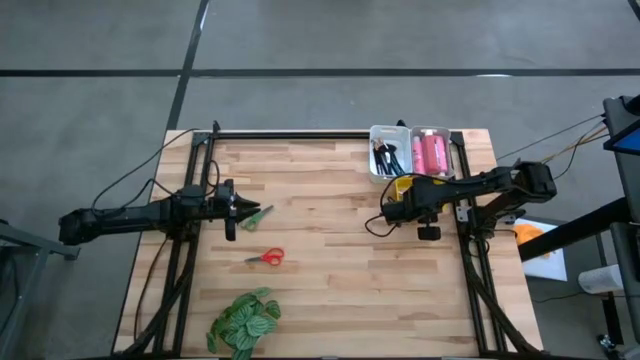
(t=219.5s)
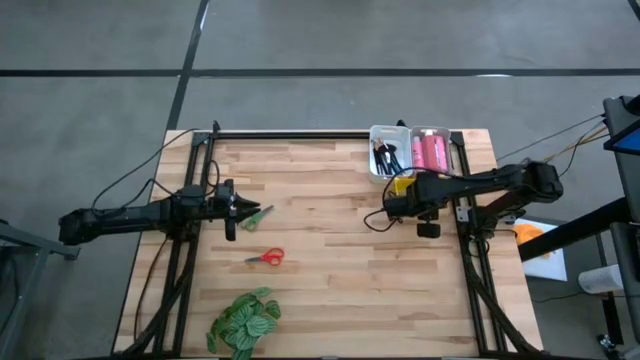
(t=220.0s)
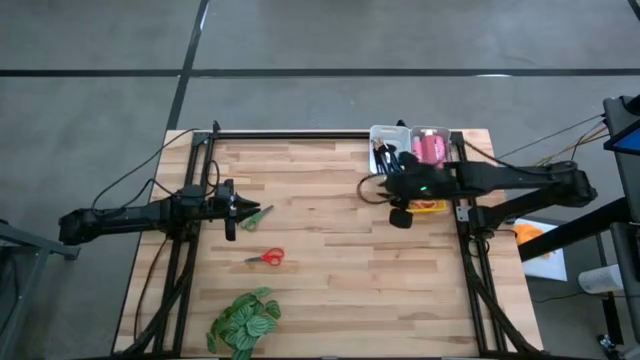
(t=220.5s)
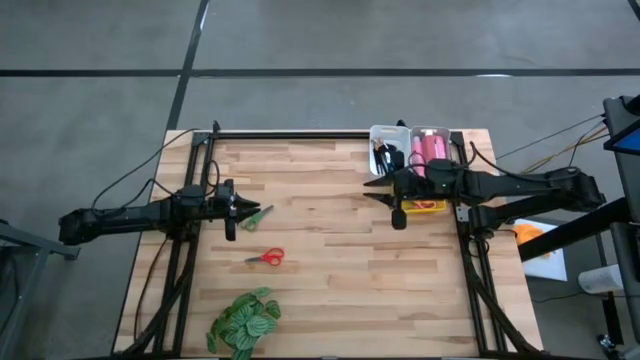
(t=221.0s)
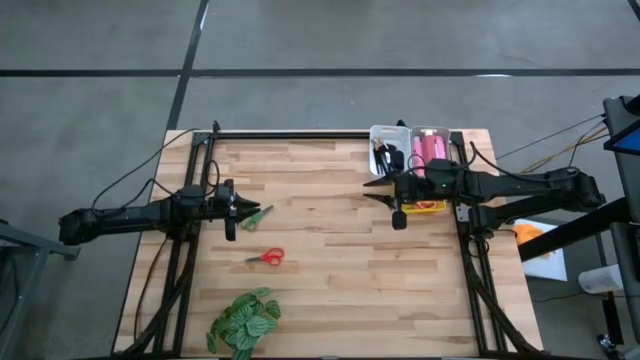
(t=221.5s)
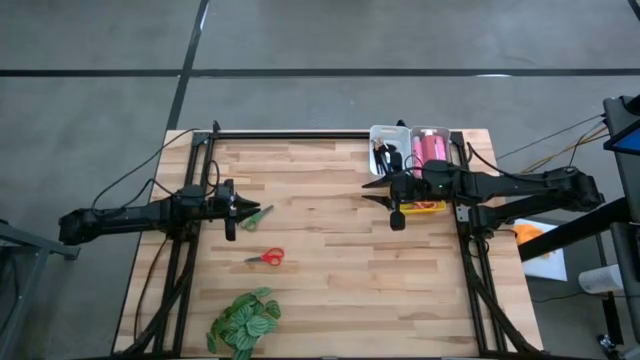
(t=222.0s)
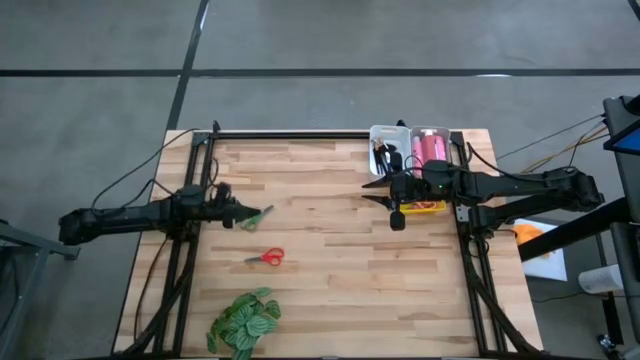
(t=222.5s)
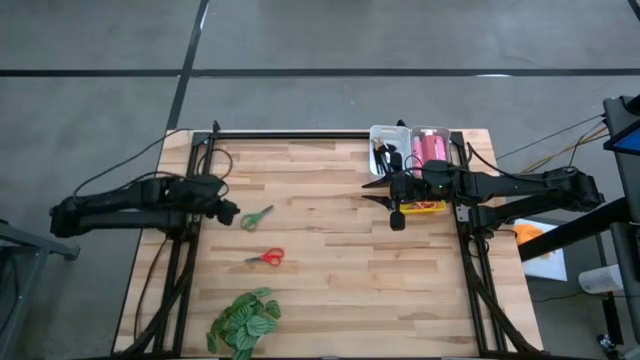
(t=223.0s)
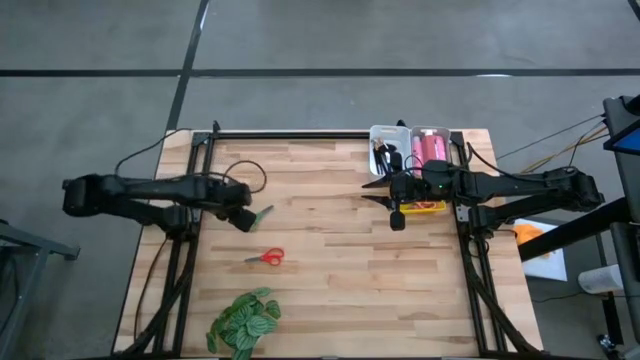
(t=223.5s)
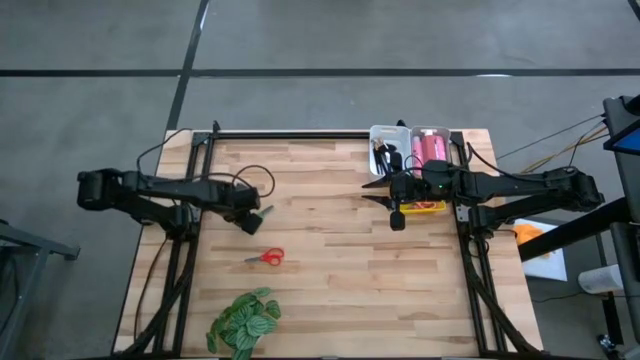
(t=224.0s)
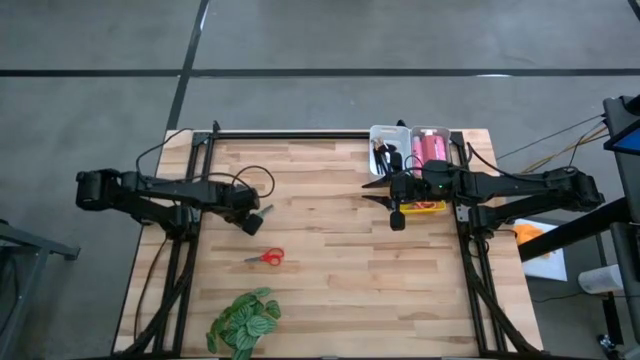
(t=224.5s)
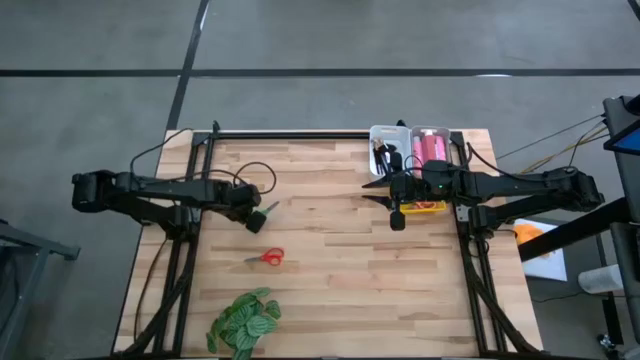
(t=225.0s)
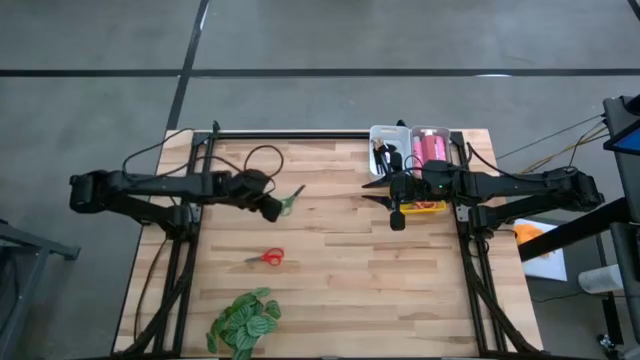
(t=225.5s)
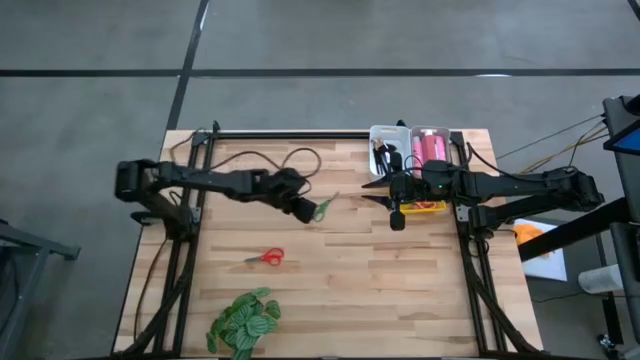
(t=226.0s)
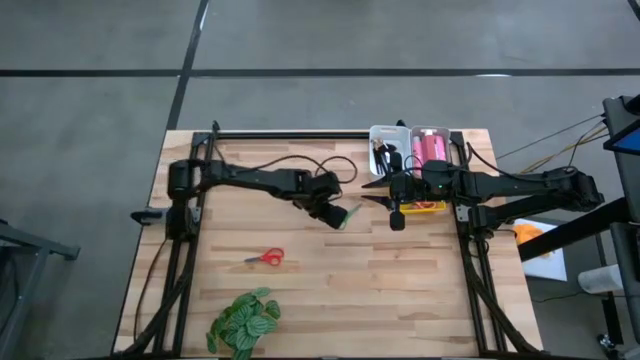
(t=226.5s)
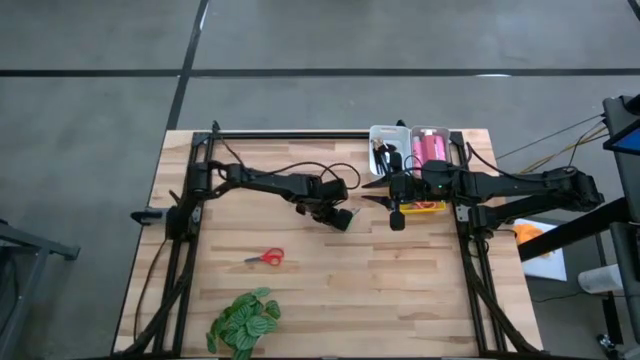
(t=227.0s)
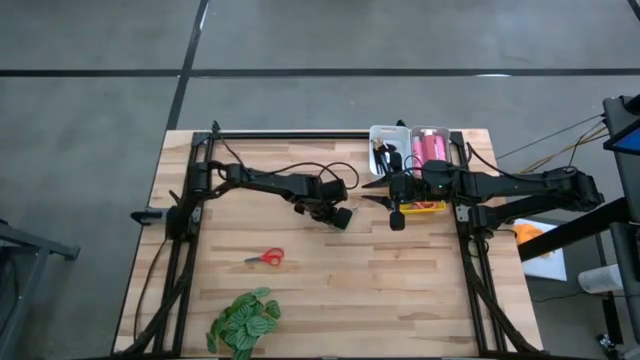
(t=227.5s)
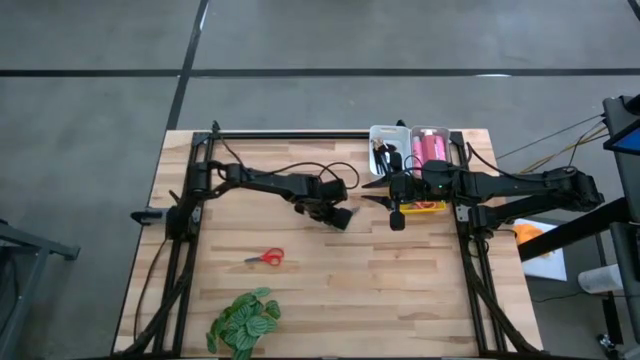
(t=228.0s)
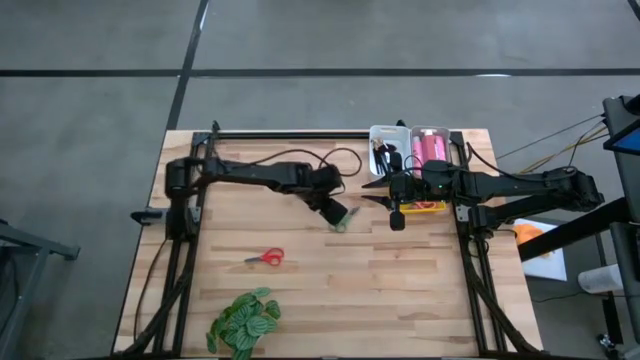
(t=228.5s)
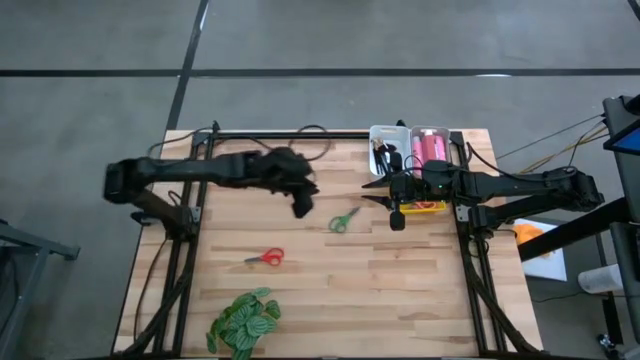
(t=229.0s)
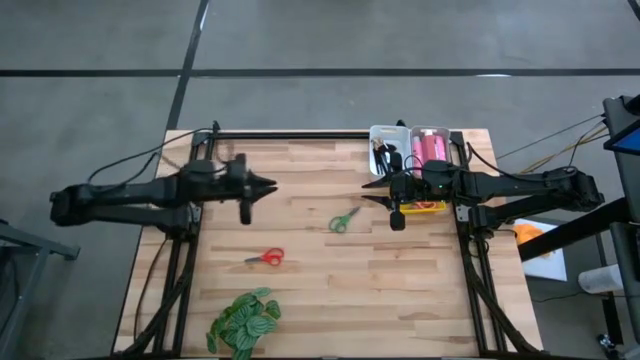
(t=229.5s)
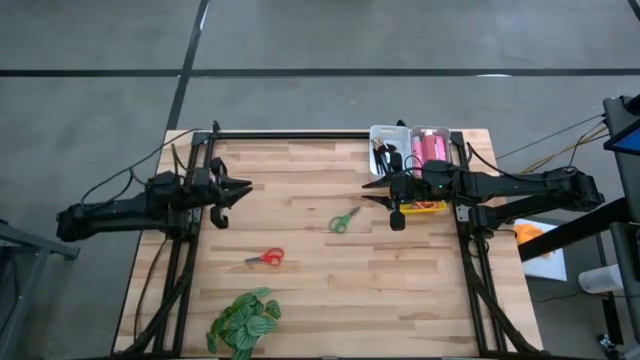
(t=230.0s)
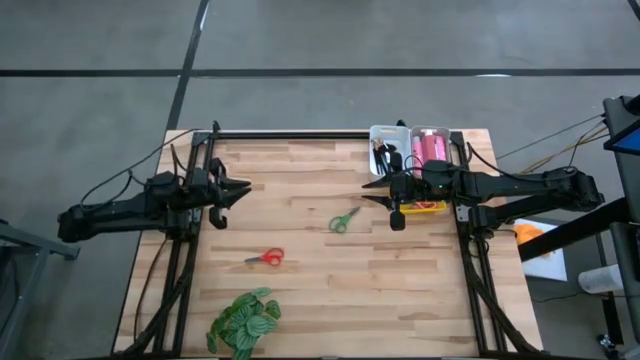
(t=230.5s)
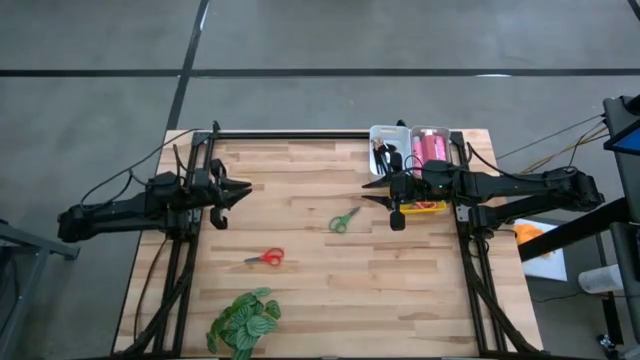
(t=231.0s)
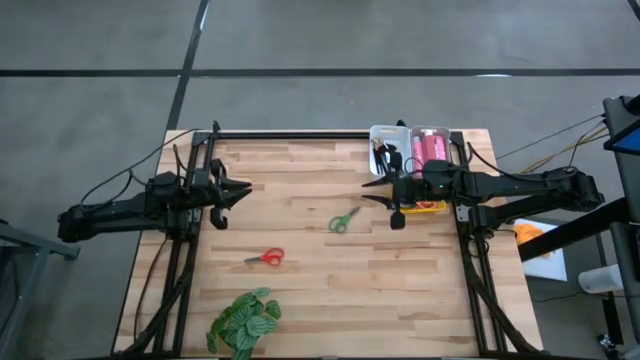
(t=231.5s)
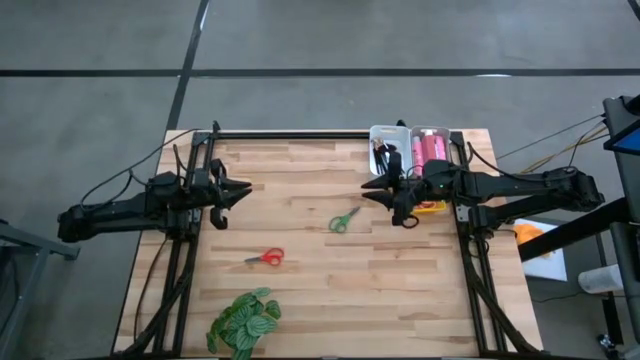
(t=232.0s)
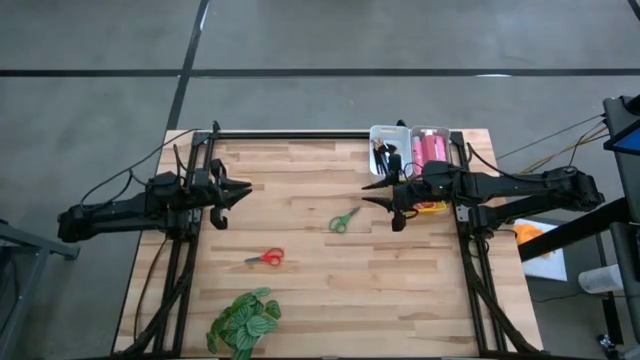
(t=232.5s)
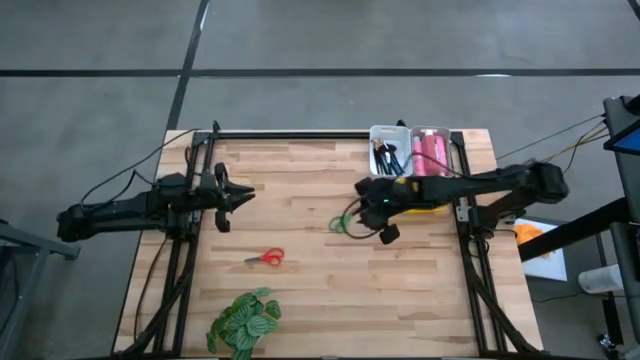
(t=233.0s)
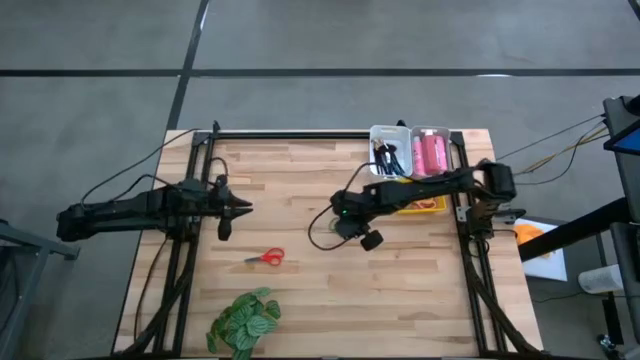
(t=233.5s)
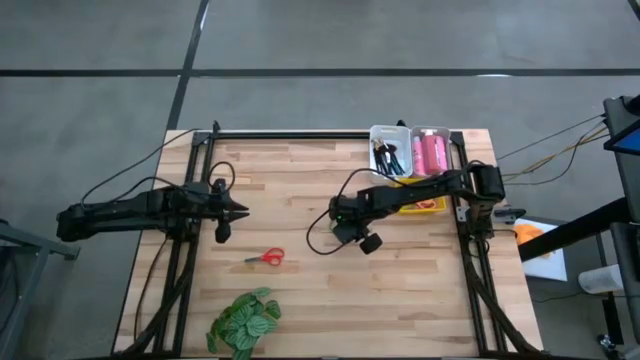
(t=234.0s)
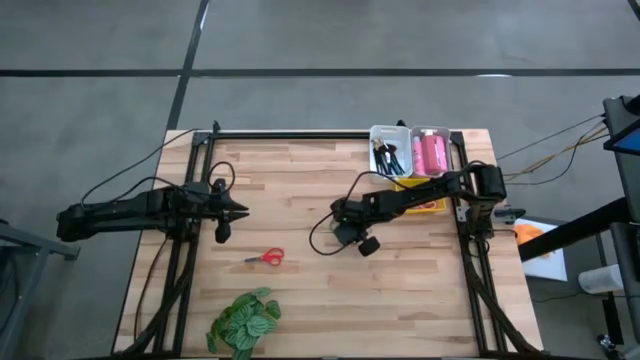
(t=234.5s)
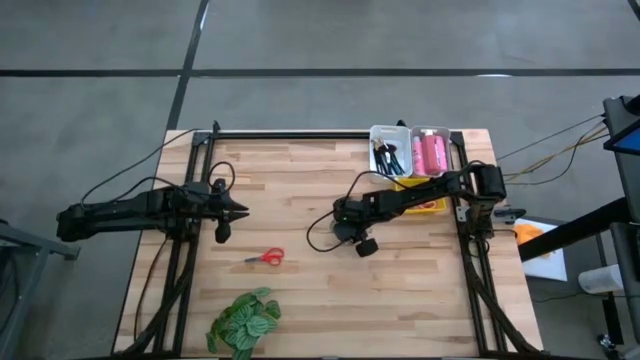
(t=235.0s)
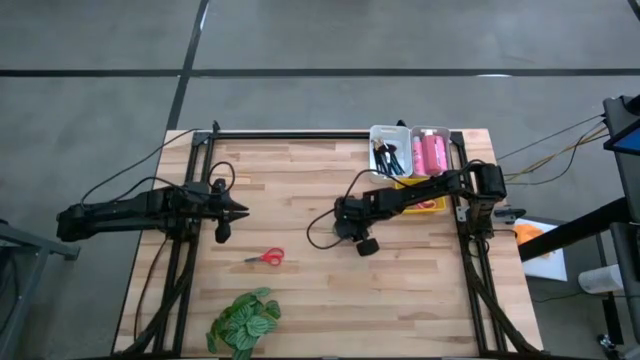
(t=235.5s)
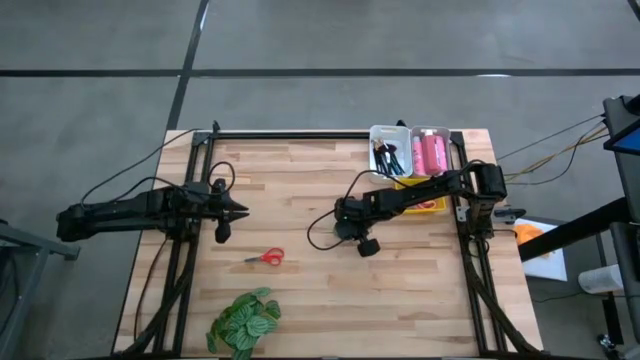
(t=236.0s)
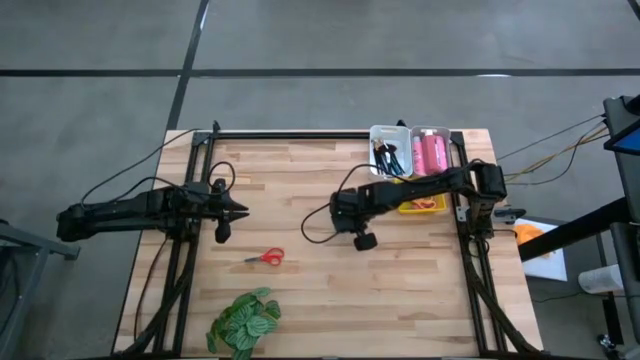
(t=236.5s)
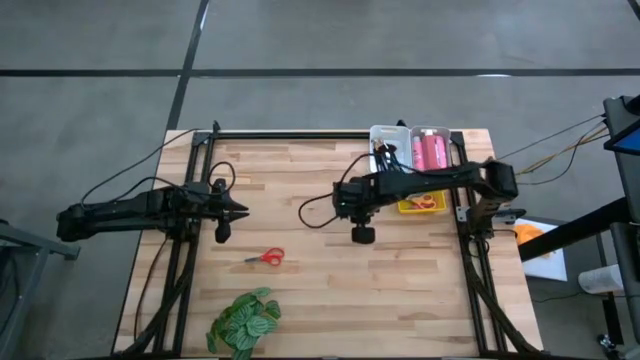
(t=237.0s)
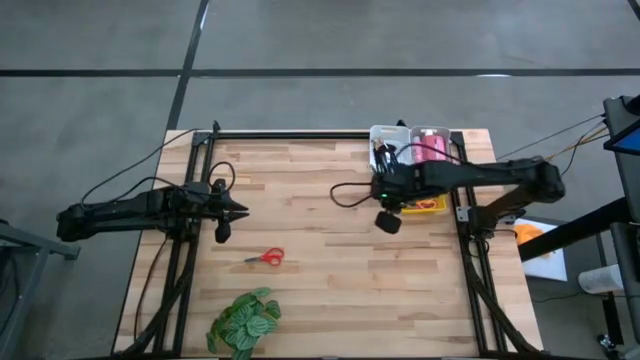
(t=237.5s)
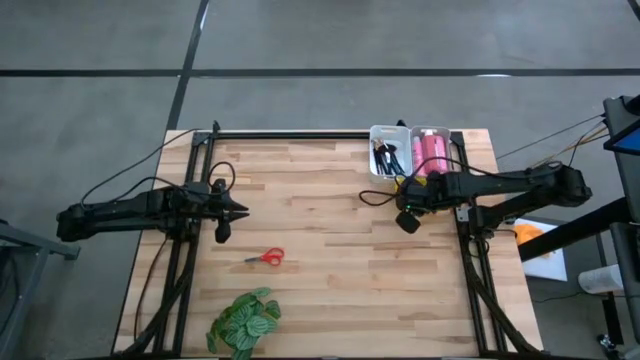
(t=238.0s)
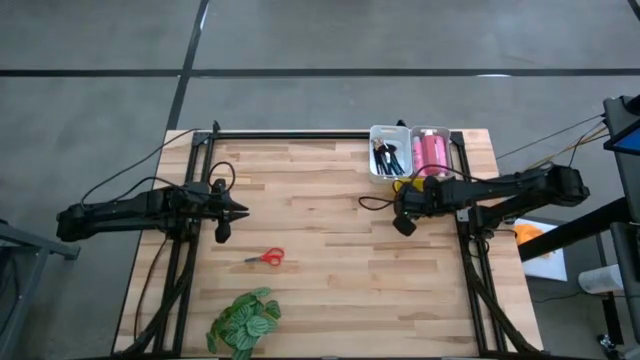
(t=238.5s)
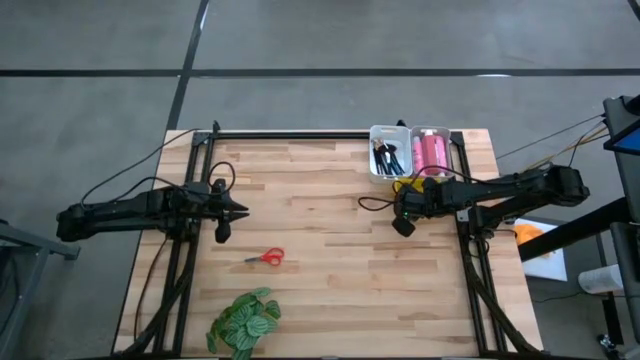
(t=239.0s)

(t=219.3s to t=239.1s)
Task: Pick & Place Paint Supplies
Put the green scissors into the yellow bin
